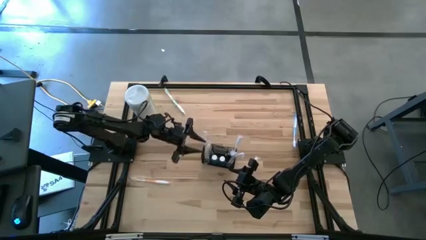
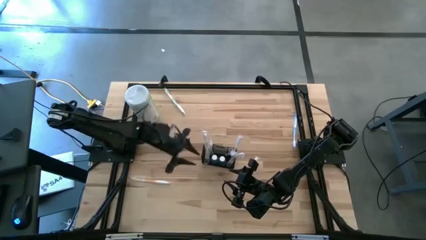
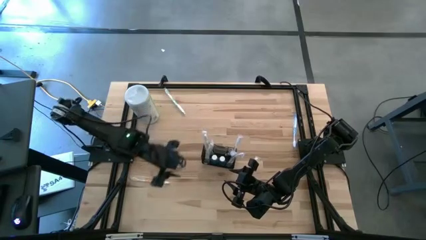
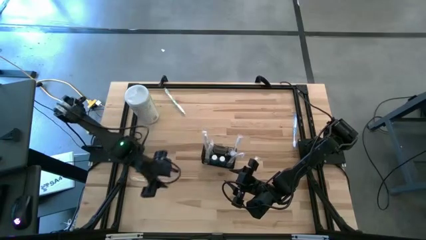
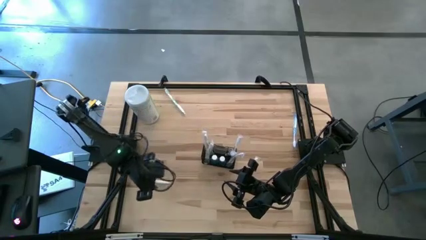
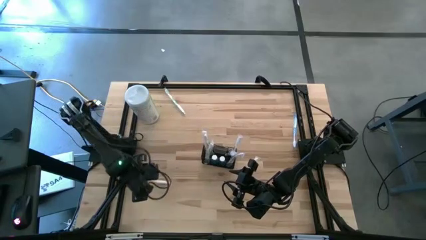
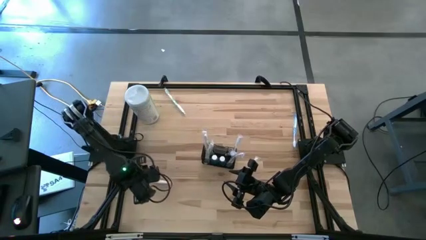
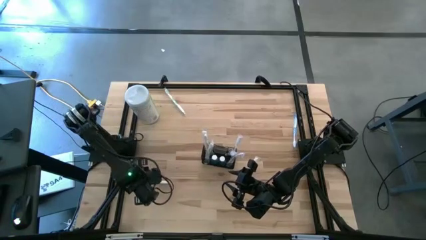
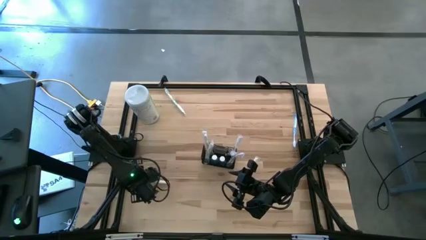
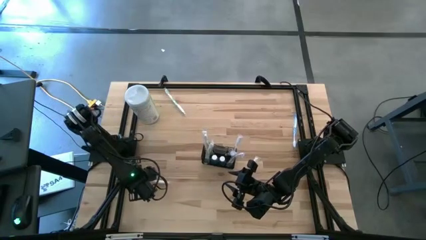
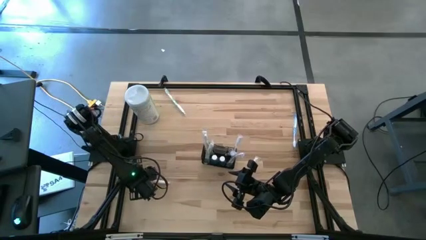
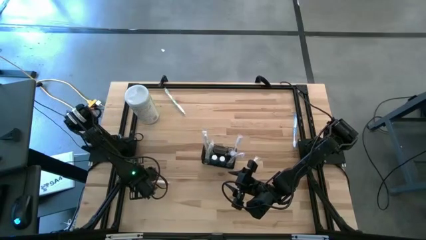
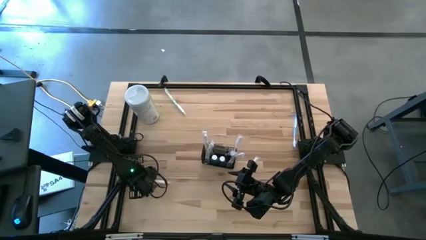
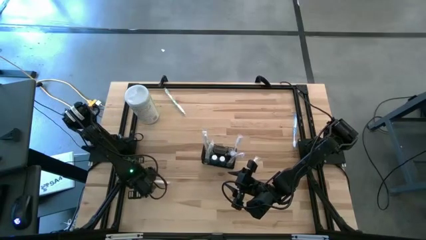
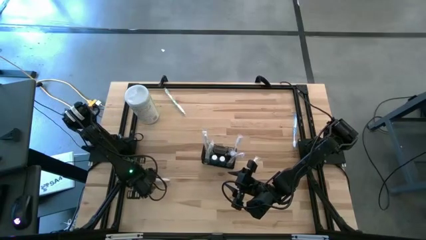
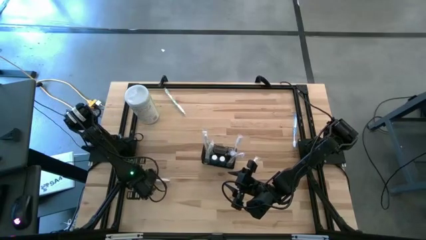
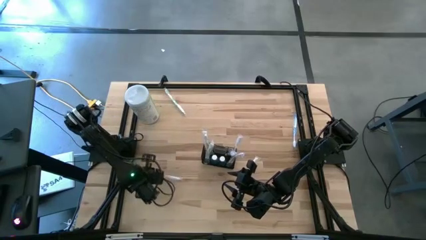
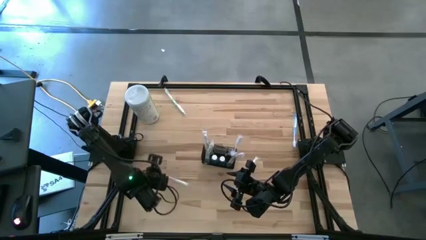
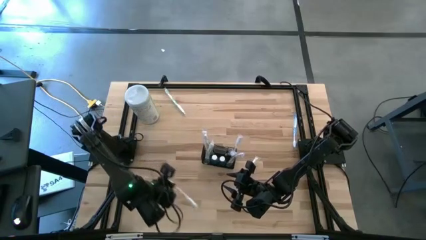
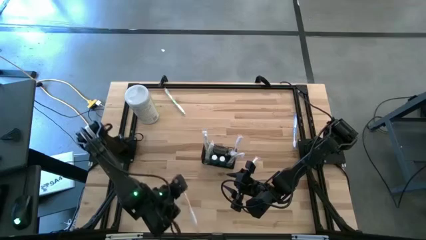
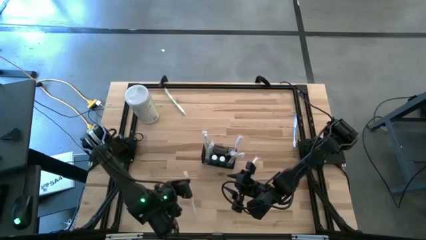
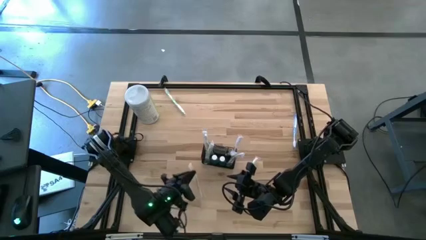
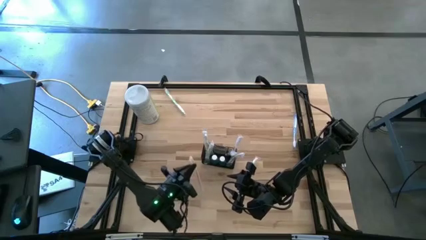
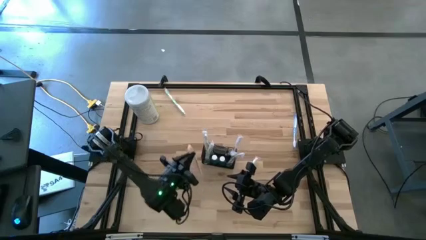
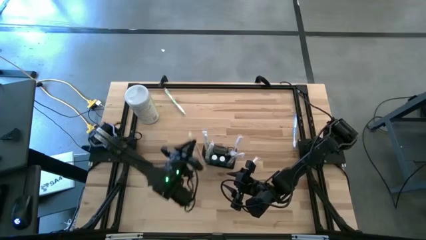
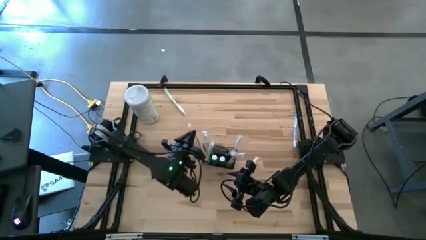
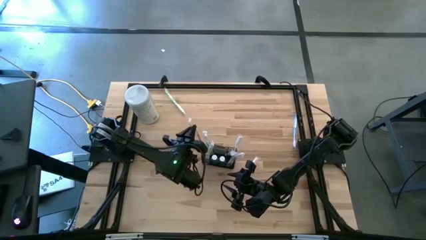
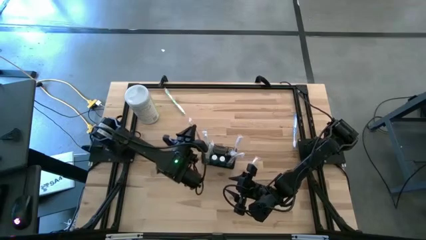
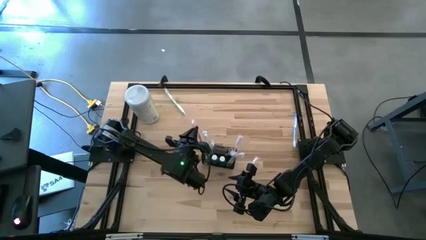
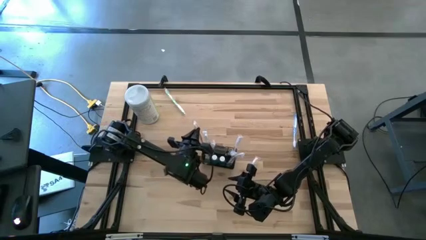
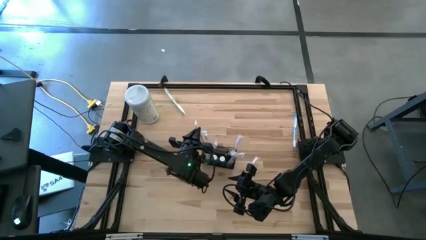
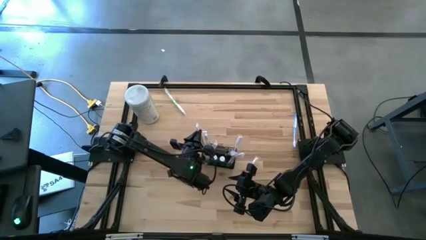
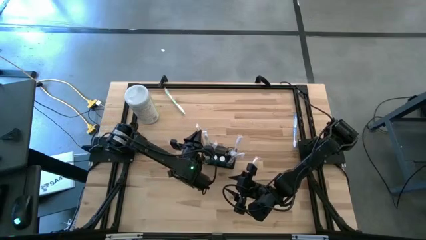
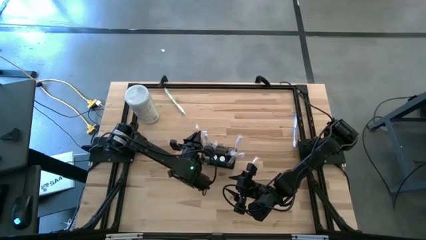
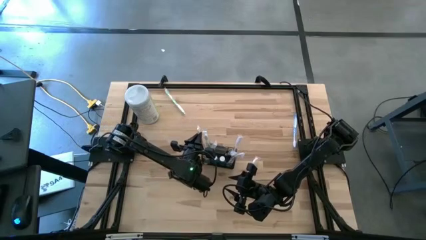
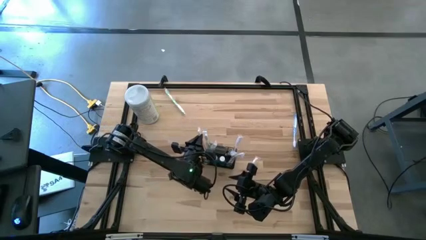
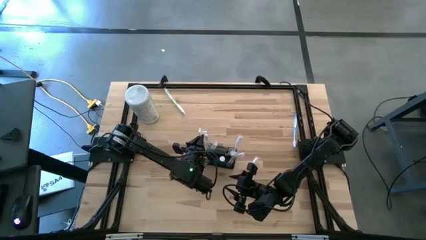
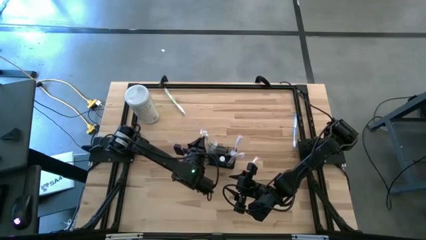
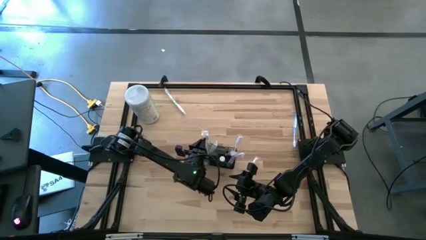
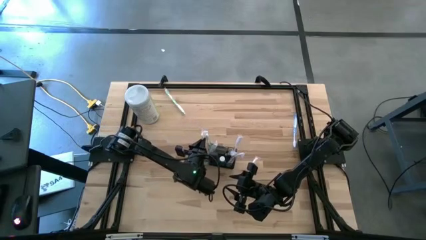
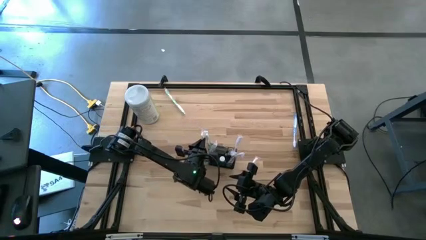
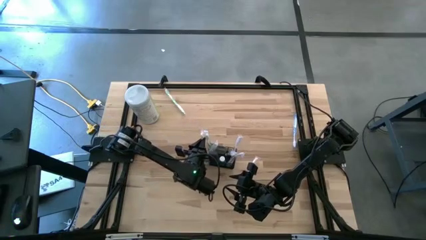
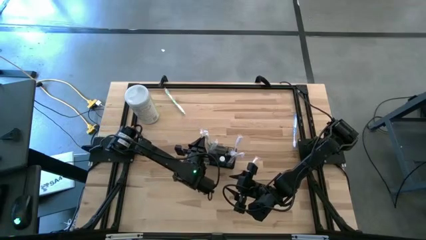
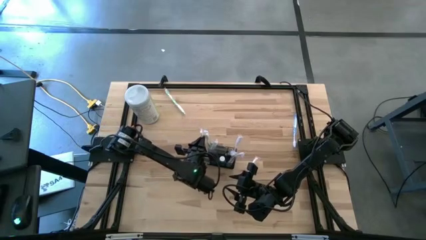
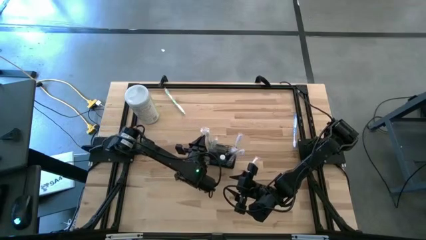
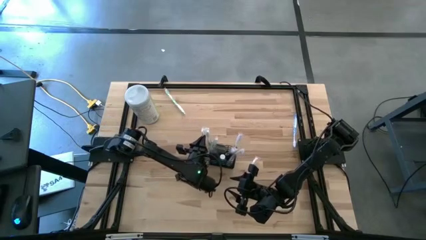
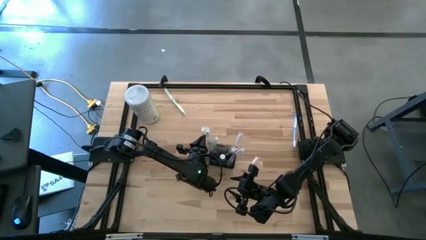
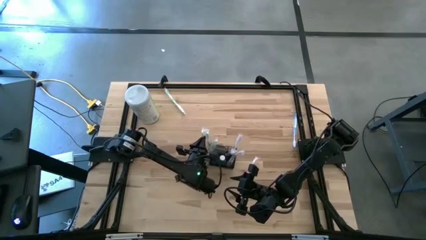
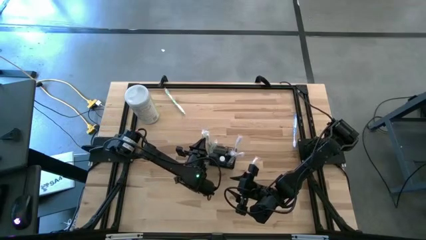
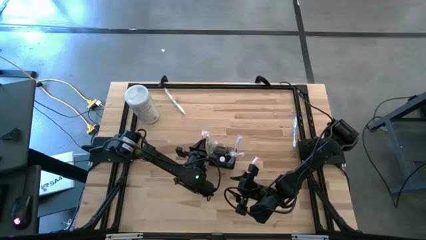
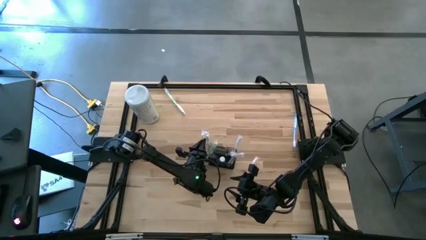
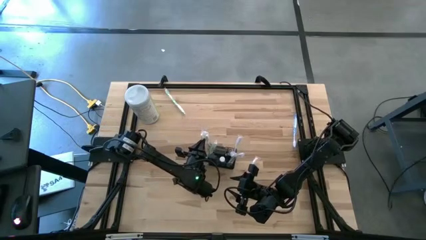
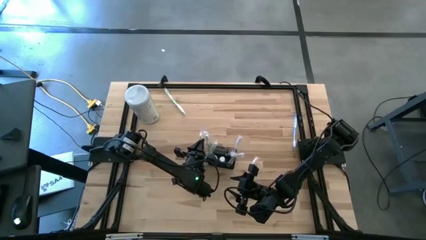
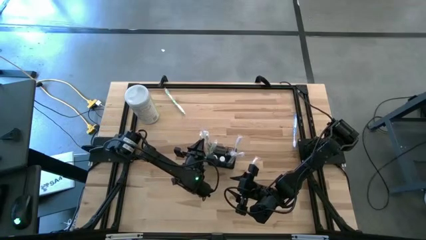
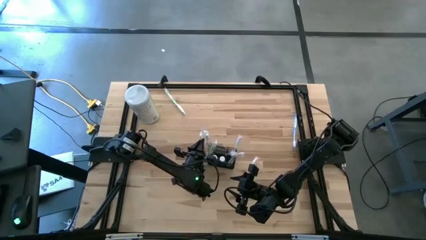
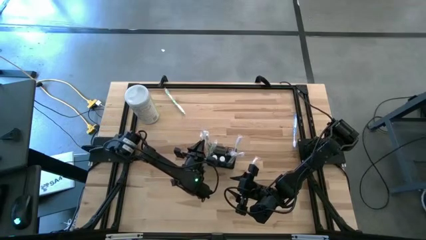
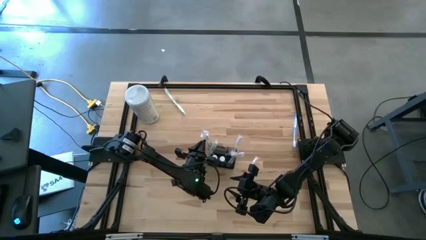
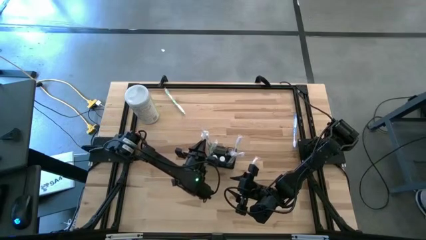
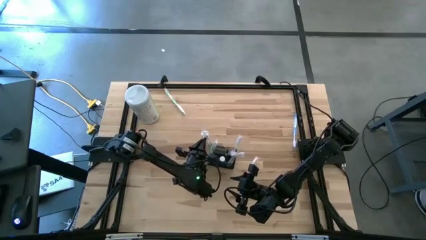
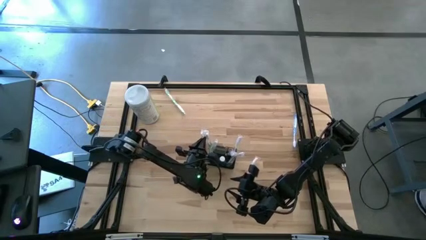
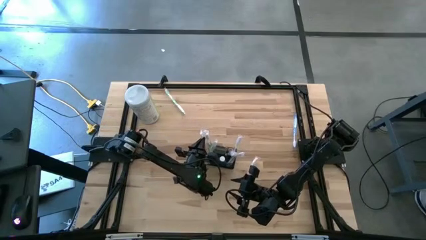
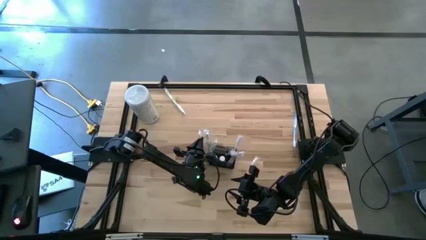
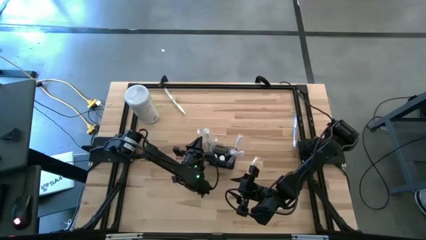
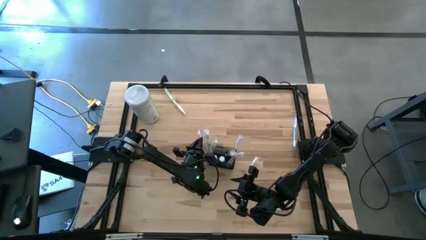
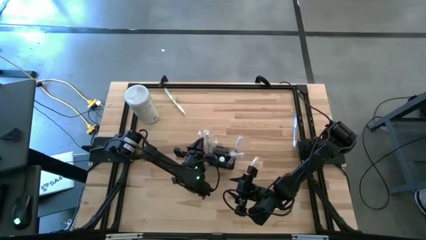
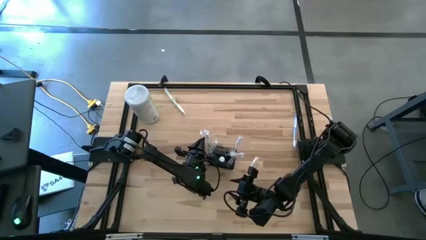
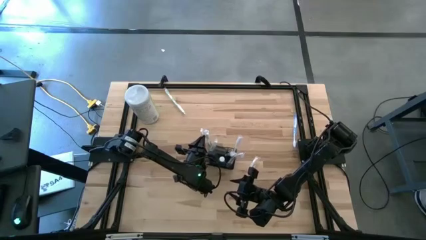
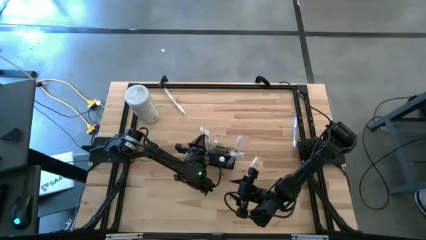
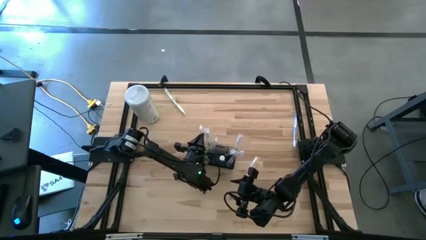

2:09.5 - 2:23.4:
Task: Pick & Place toothbrushing station
Put the left orange toothbrush into the mesh organizer
